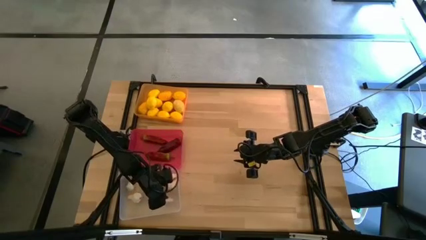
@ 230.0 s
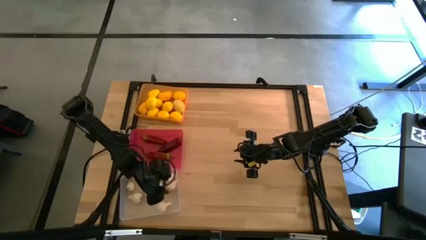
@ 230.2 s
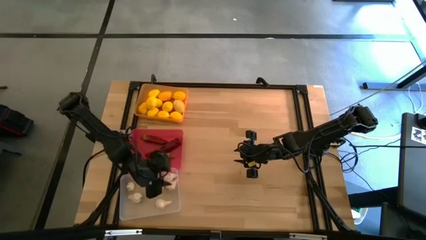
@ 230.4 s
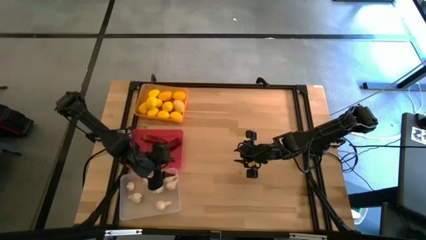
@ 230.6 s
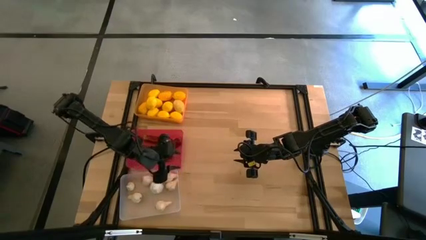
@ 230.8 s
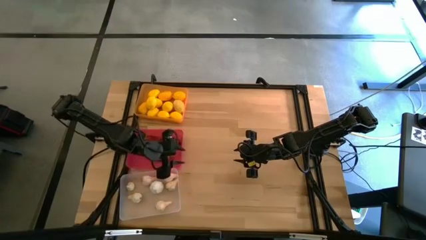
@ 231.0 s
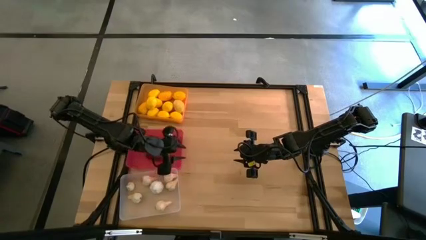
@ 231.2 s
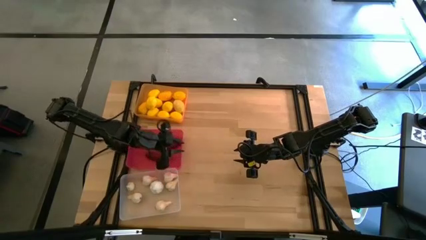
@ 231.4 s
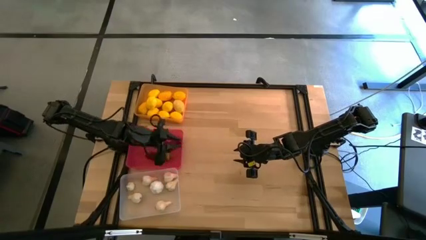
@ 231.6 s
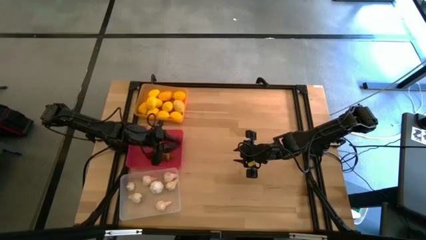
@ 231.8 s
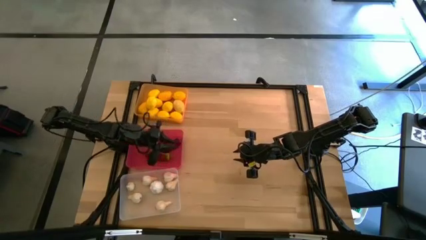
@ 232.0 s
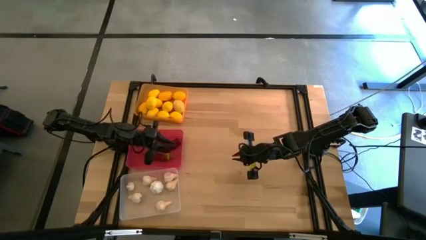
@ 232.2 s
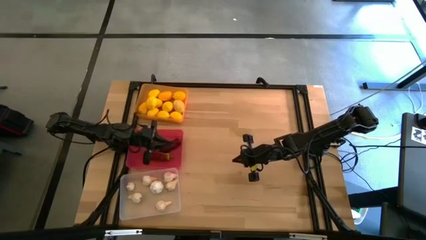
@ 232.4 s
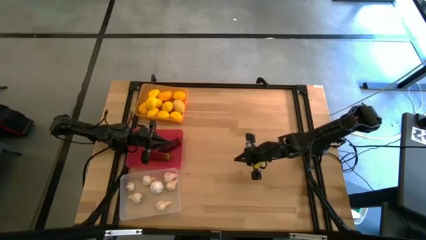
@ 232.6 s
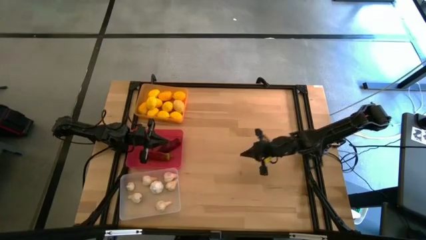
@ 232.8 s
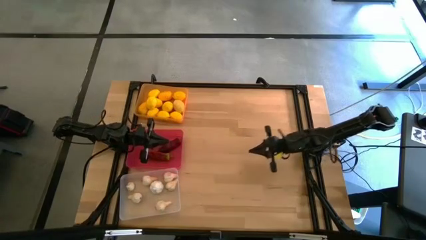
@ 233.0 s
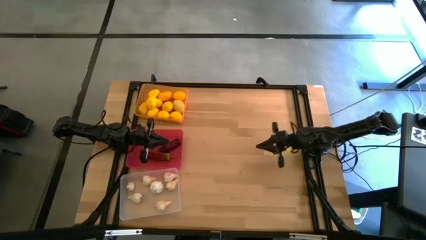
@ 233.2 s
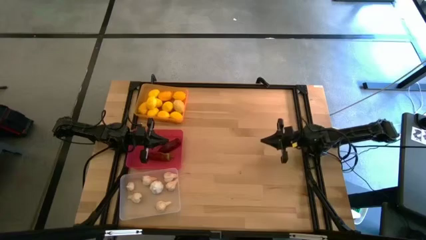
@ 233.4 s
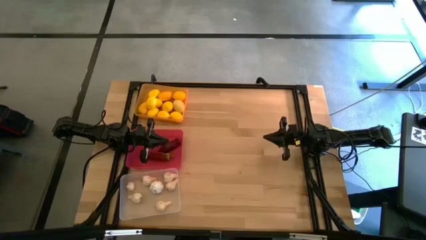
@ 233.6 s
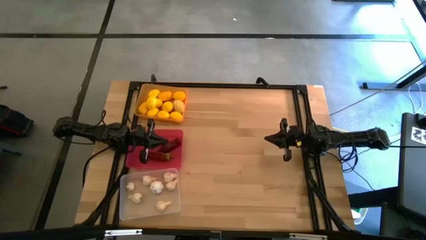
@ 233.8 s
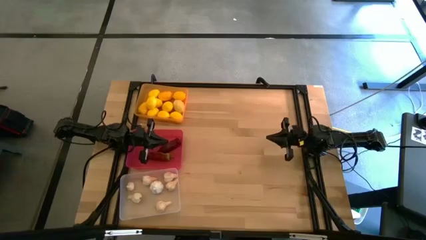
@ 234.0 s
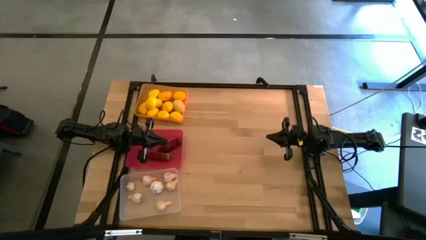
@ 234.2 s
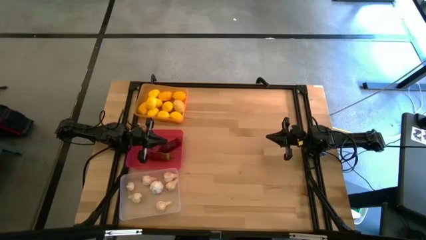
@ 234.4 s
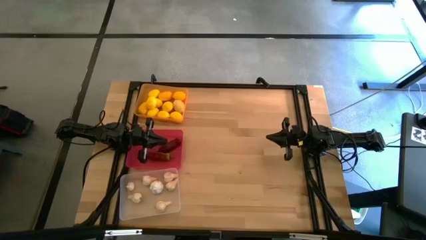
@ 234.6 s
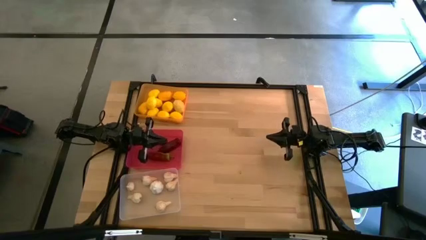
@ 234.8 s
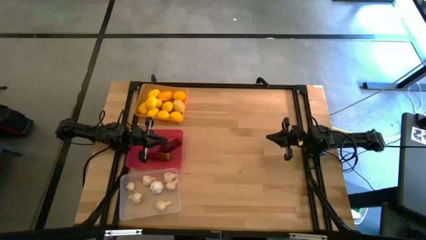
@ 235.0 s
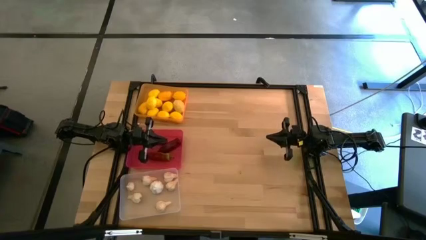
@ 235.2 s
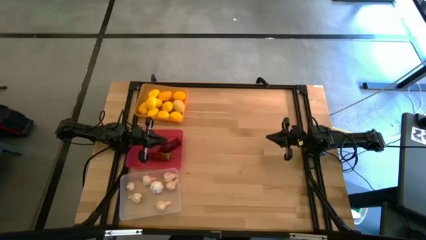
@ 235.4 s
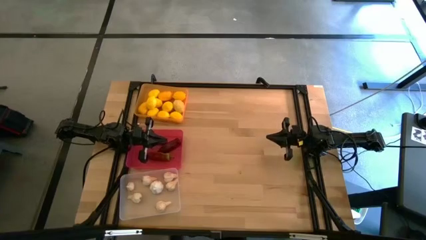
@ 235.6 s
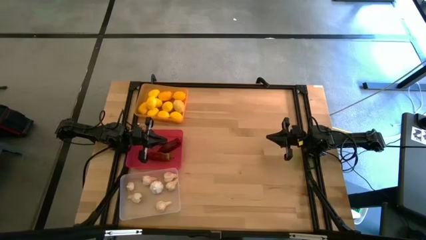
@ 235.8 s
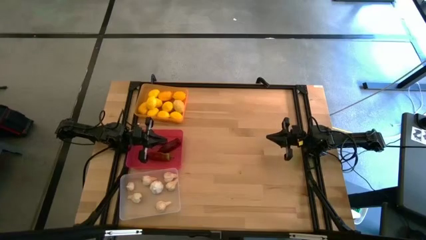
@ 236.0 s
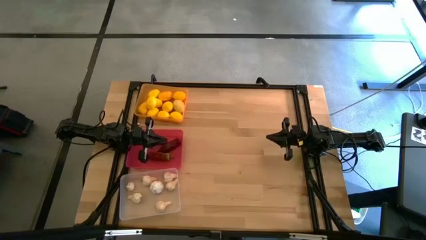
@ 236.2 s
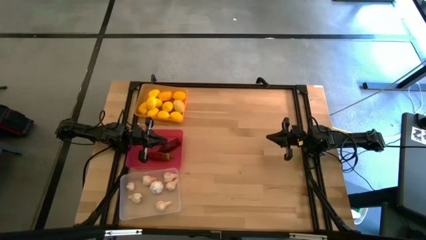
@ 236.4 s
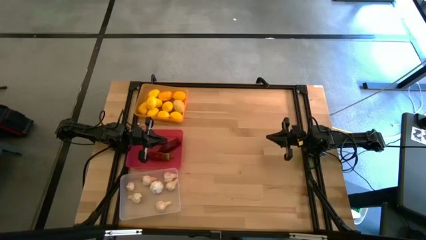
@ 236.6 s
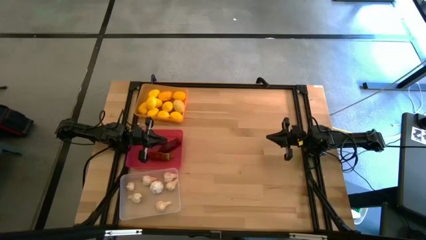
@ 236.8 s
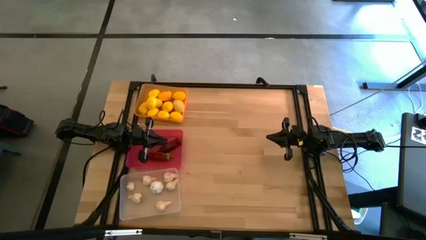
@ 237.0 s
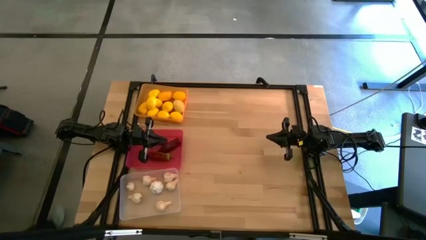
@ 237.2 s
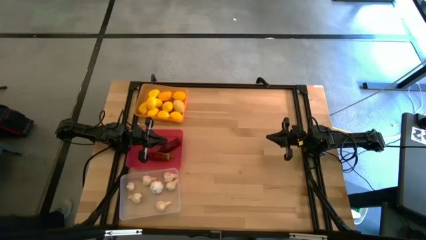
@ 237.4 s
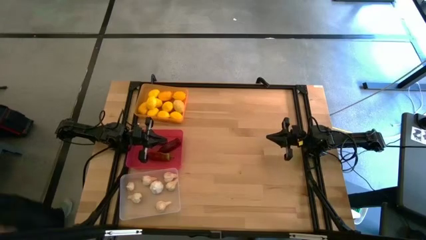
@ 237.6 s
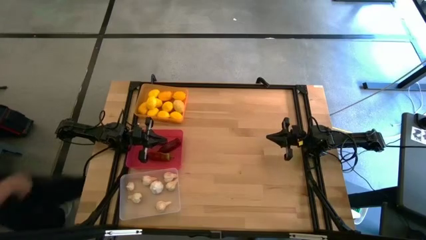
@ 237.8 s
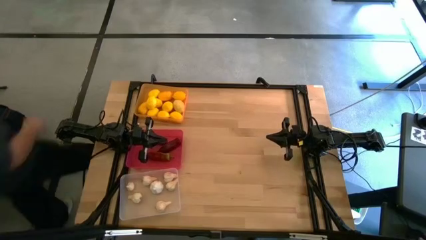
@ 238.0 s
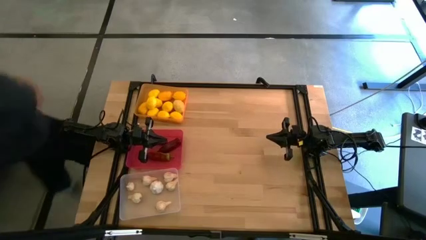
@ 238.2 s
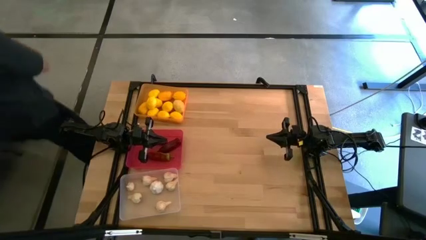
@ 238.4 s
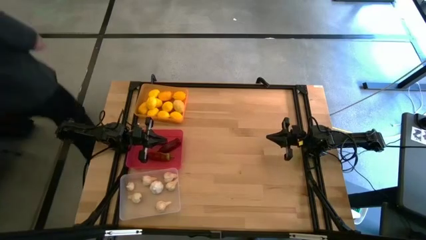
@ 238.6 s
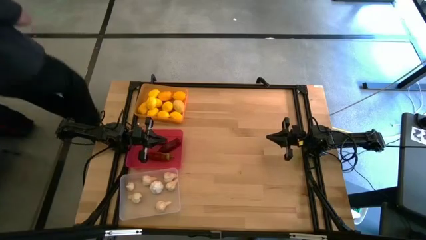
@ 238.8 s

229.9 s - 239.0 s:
Task: Sort produce into baskets
Return to Home Position

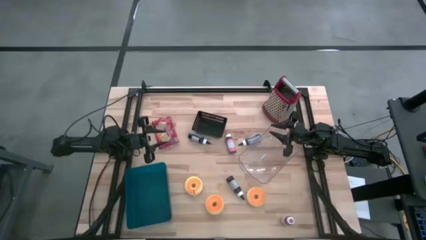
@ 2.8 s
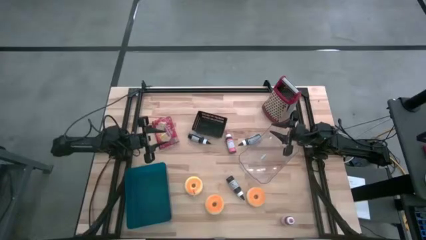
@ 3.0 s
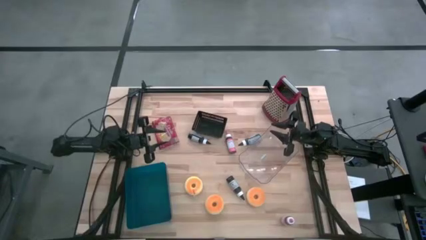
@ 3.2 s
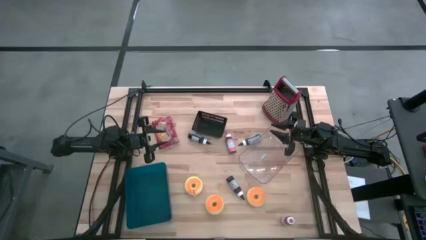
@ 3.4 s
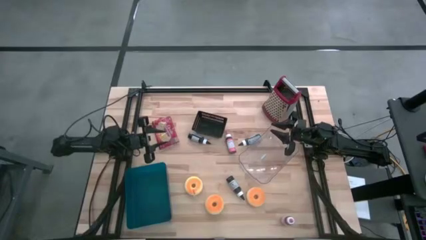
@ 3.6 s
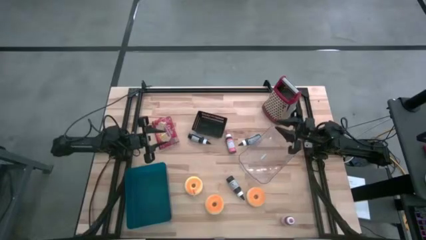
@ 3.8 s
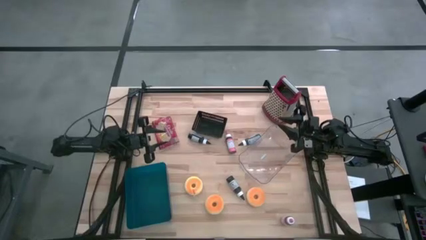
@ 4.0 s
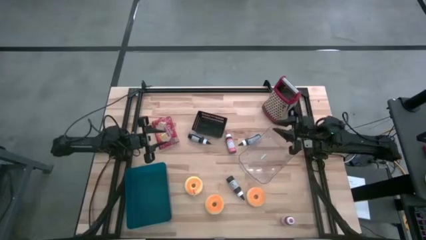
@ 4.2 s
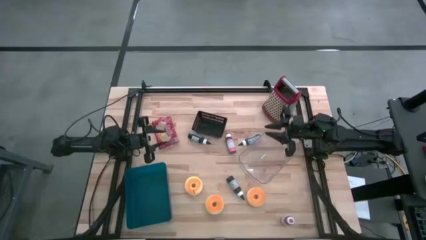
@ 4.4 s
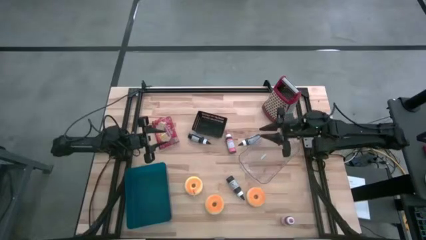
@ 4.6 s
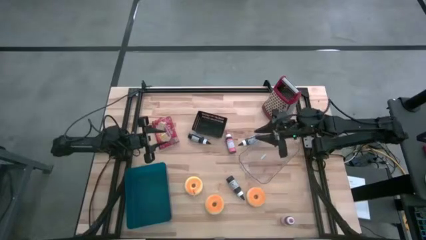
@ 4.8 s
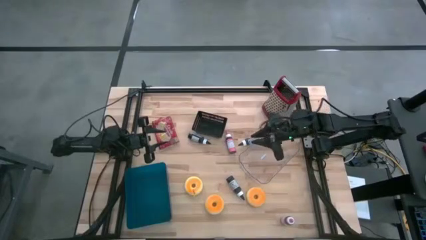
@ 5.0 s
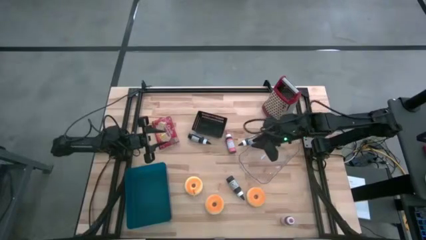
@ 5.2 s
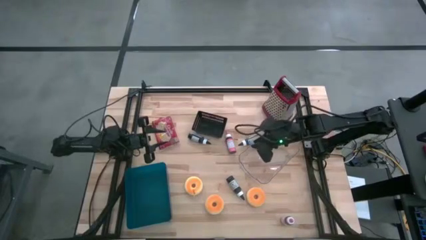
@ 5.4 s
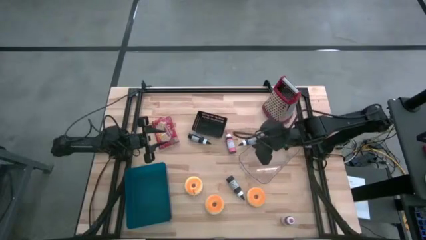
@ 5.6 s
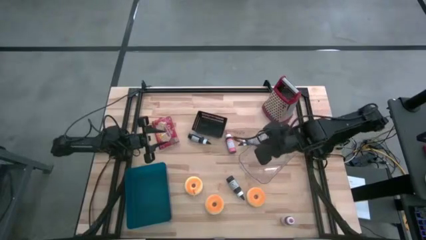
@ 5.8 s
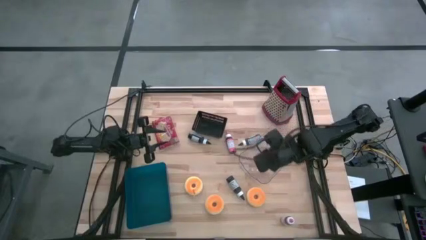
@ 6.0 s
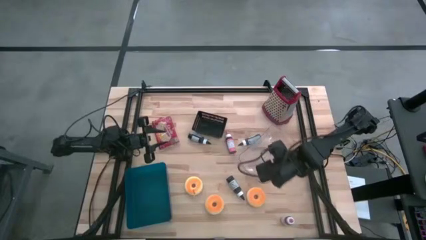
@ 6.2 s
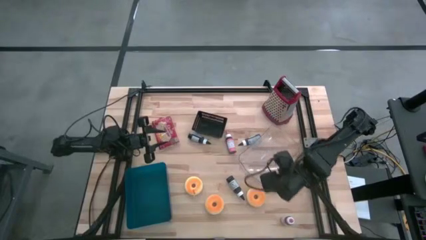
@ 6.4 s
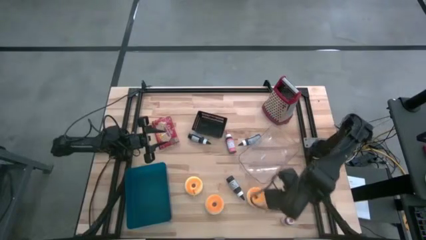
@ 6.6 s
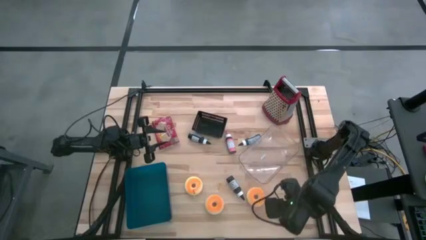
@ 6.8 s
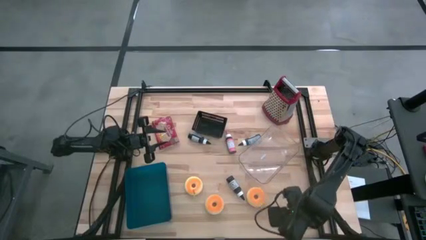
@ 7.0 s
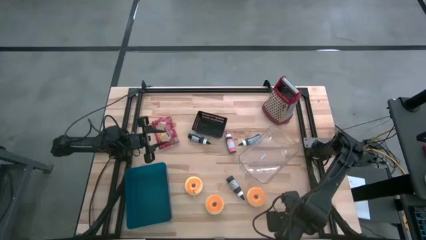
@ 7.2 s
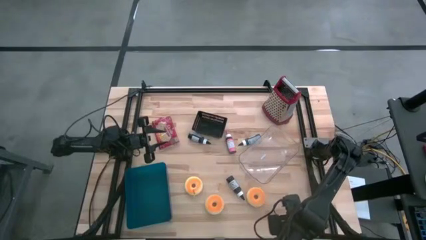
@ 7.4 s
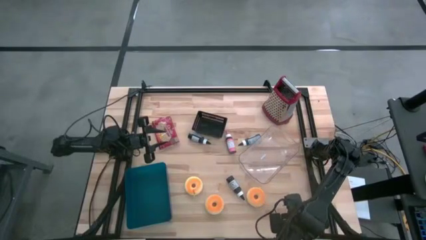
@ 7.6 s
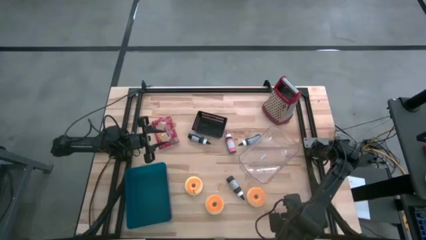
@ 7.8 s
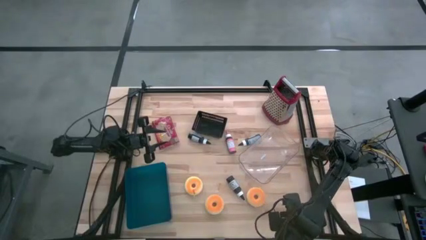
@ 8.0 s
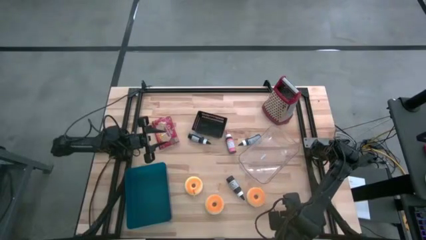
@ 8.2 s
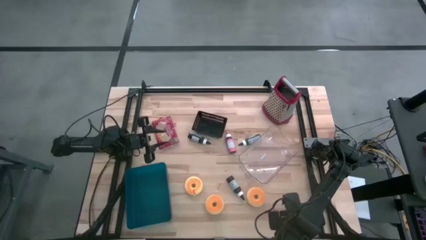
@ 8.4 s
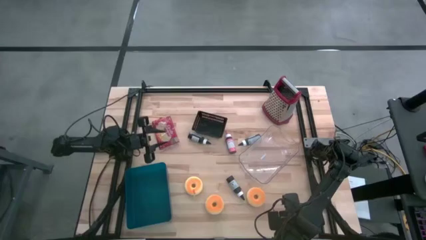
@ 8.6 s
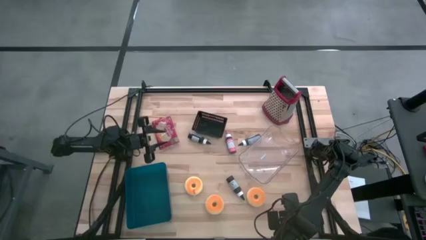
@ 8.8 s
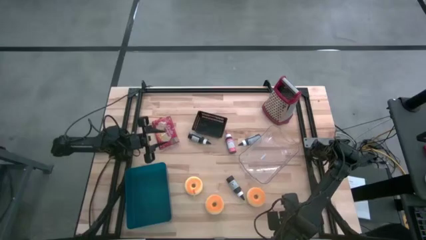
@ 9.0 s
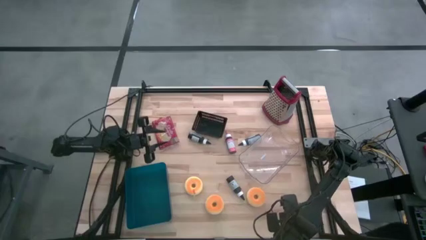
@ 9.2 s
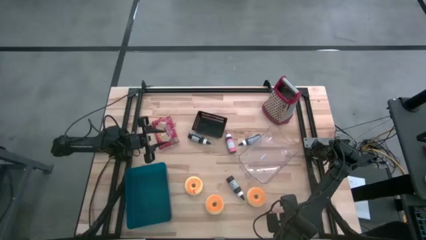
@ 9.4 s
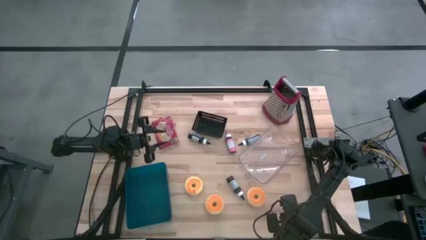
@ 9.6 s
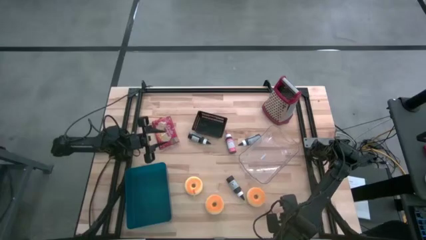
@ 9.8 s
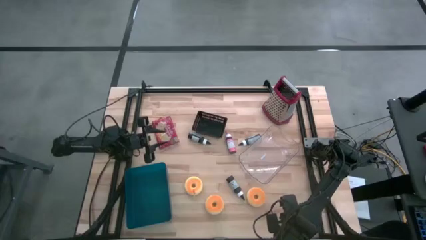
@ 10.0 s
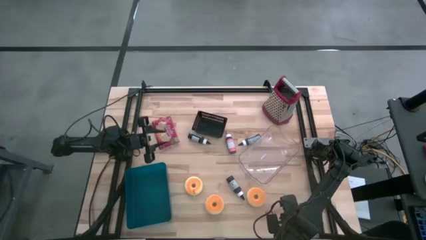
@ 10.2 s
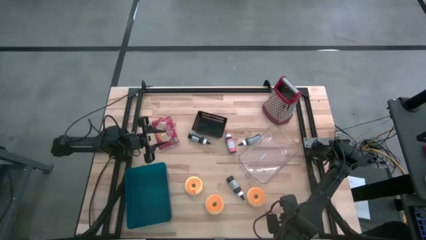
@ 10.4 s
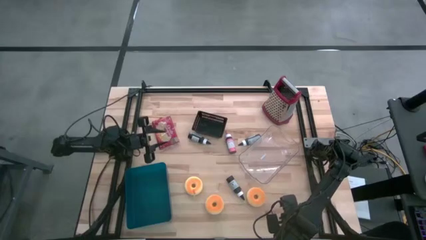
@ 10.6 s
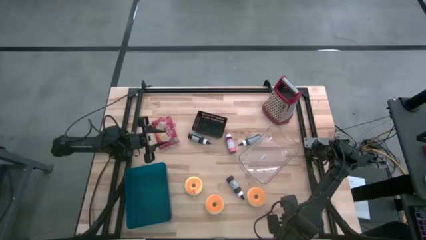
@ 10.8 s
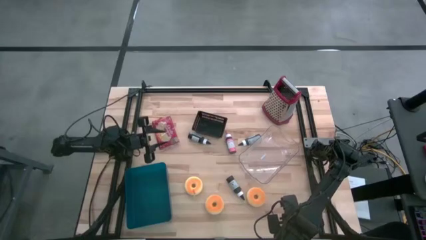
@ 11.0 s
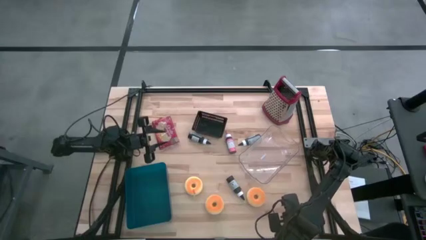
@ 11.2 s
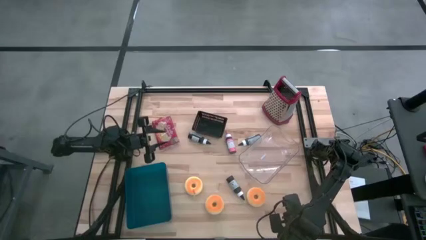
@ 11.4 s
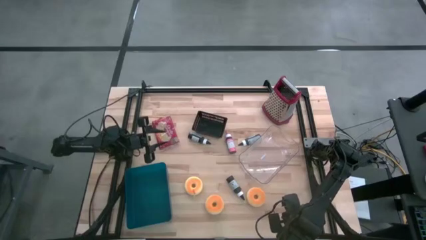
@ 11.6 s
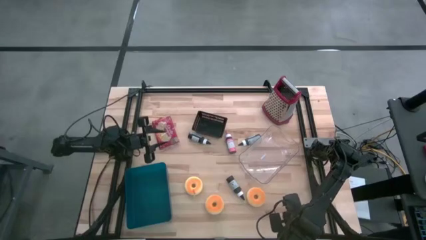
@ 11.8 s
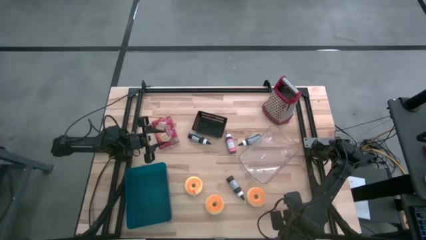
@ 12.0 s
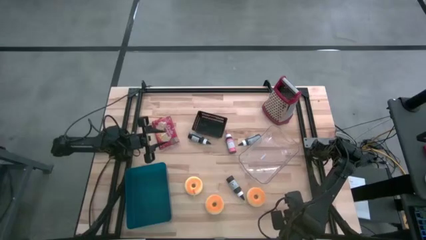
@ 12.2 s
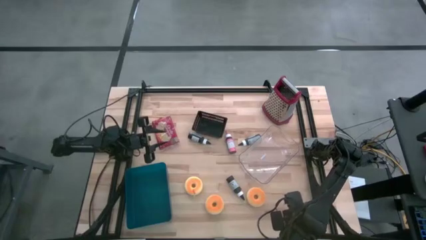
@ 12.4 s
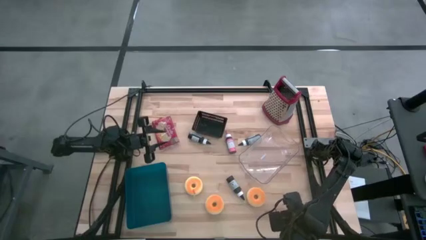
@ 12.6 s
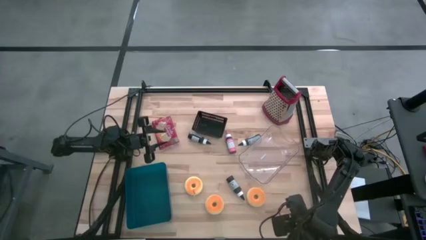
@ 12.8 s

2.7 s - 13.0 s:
Task: Pick & Place Food Item
Put the bottom pink food coloring bottle into the transparent bin
